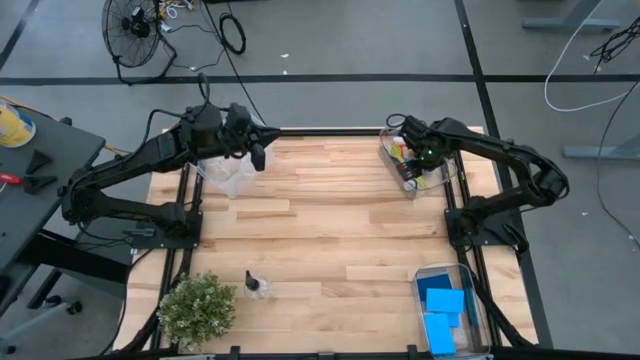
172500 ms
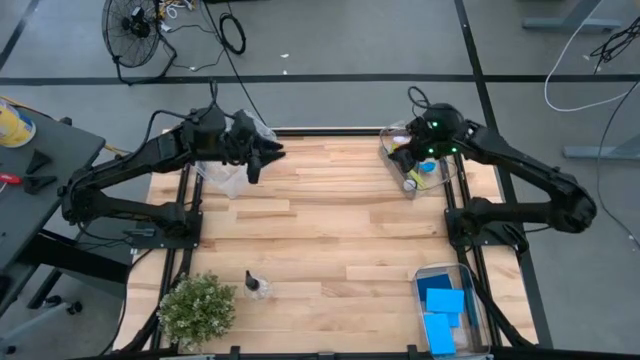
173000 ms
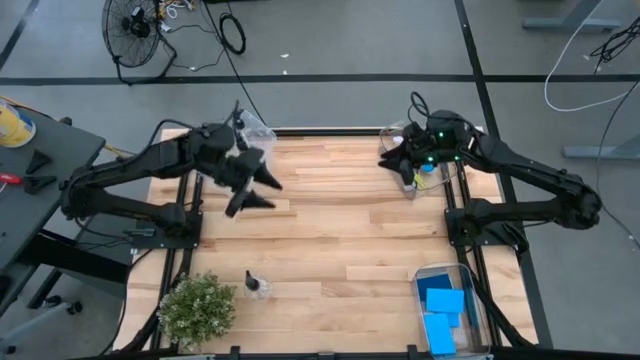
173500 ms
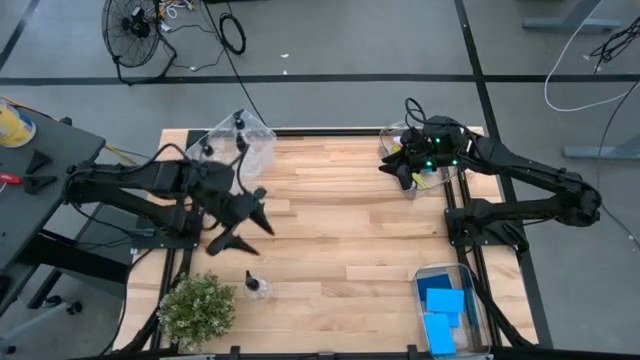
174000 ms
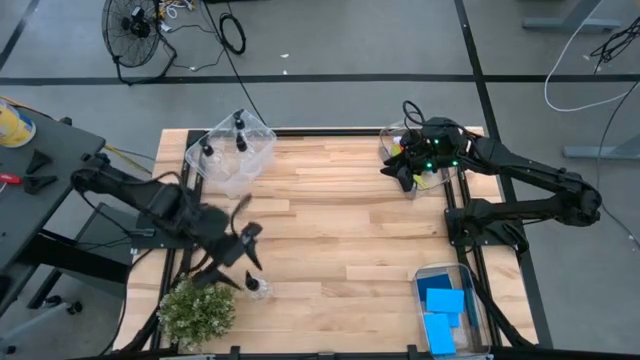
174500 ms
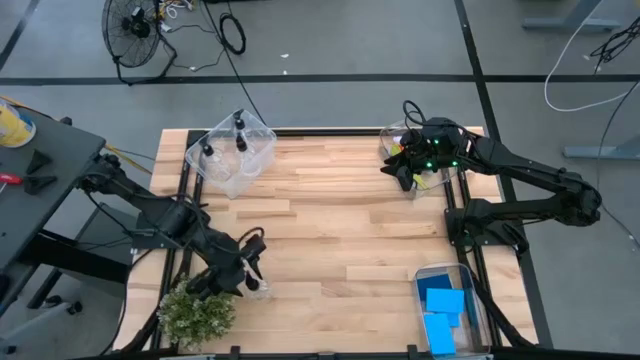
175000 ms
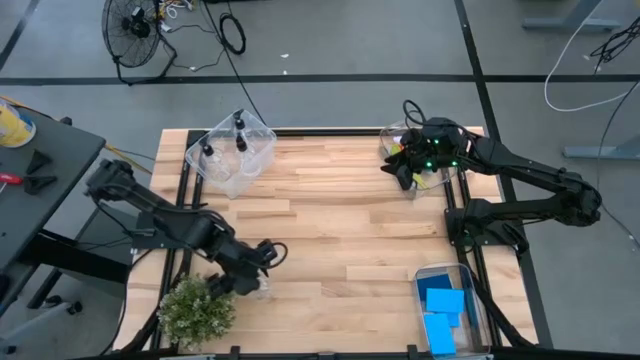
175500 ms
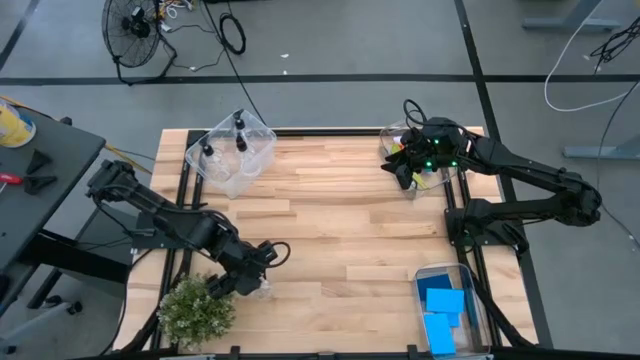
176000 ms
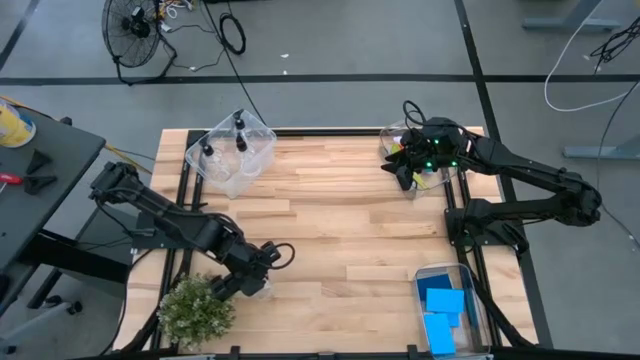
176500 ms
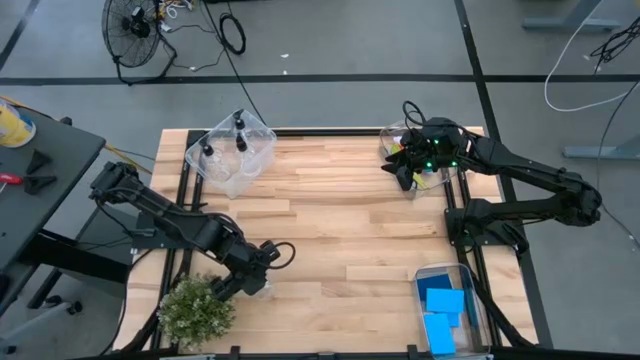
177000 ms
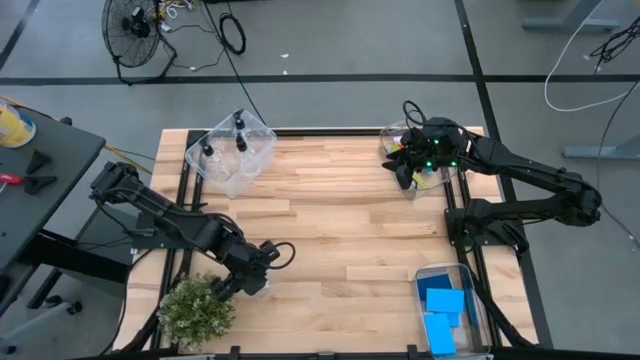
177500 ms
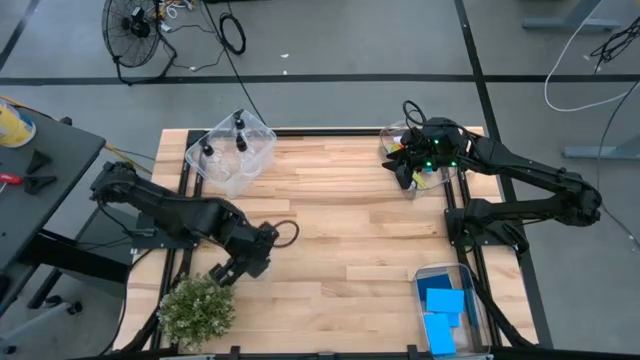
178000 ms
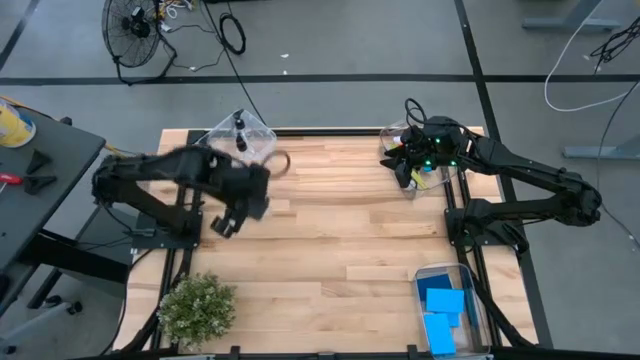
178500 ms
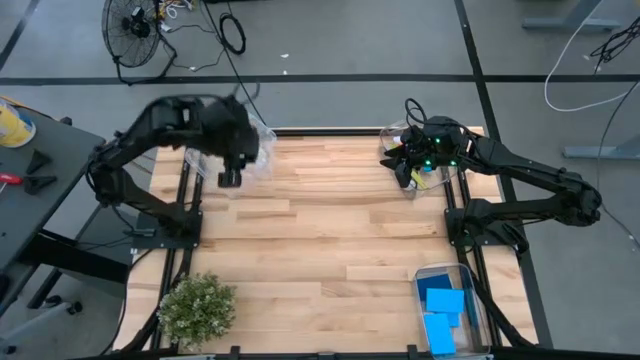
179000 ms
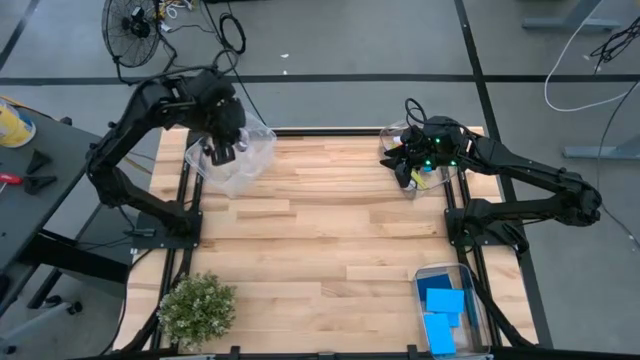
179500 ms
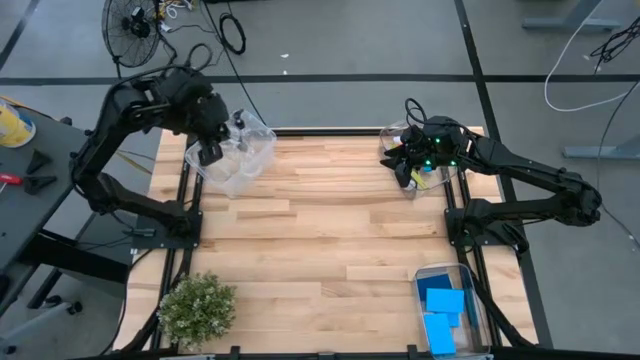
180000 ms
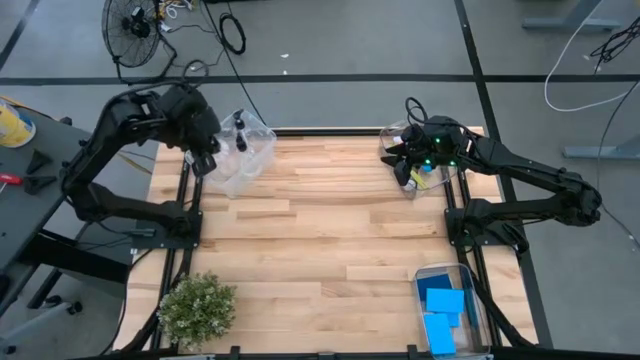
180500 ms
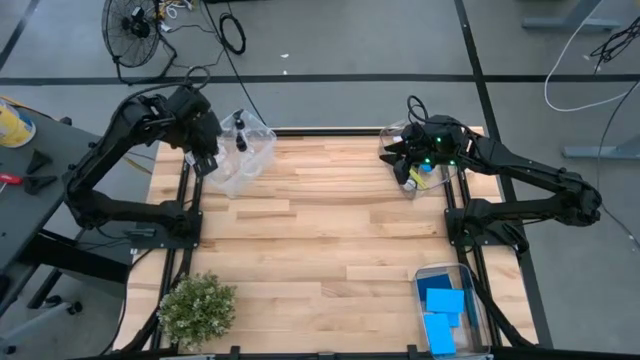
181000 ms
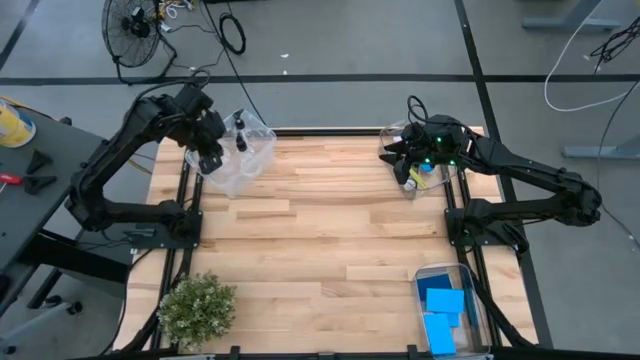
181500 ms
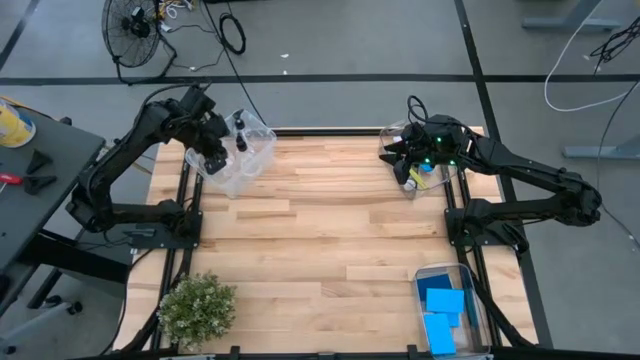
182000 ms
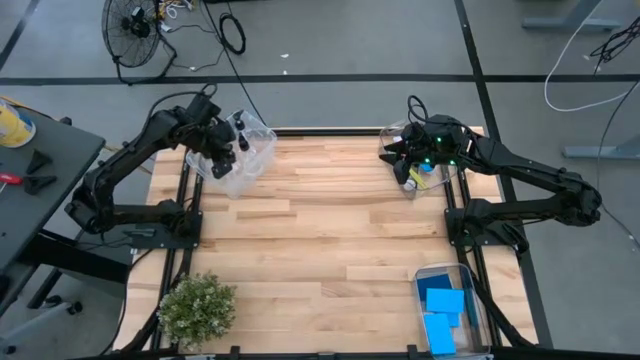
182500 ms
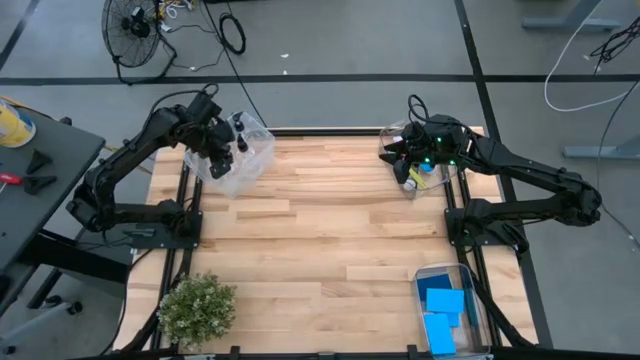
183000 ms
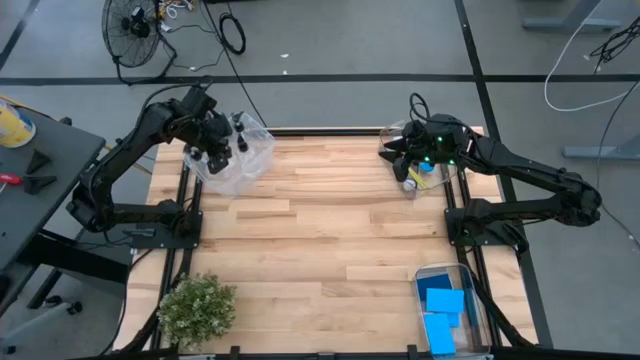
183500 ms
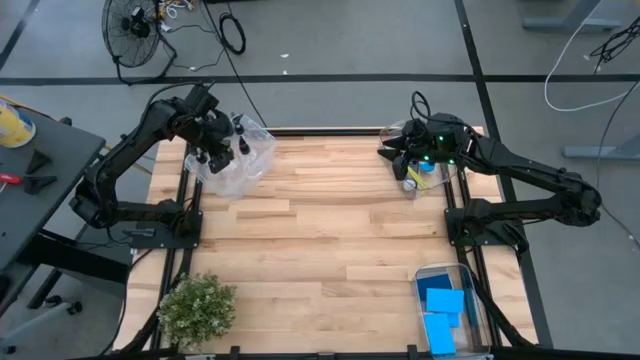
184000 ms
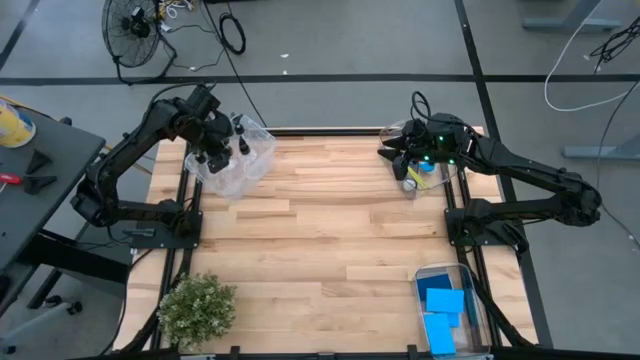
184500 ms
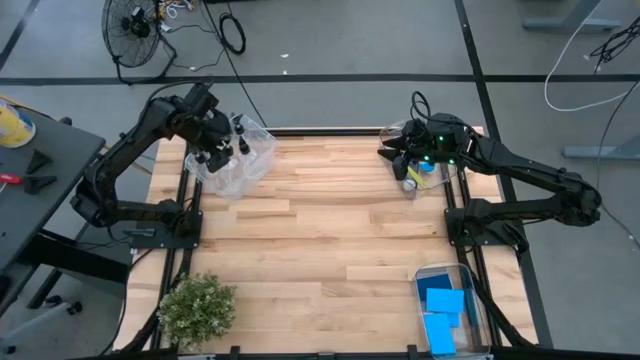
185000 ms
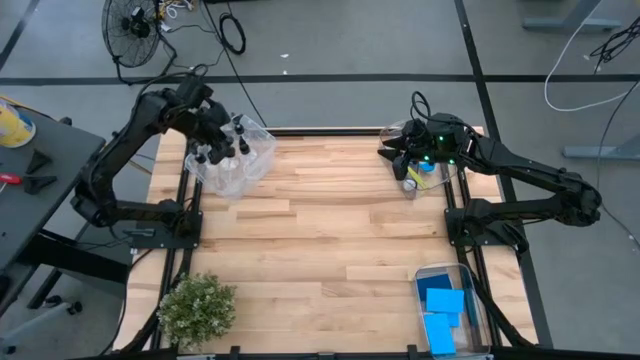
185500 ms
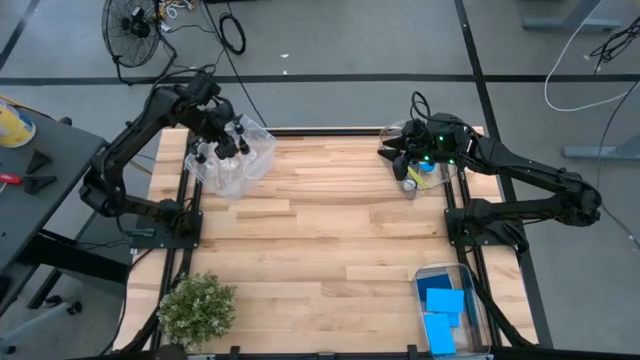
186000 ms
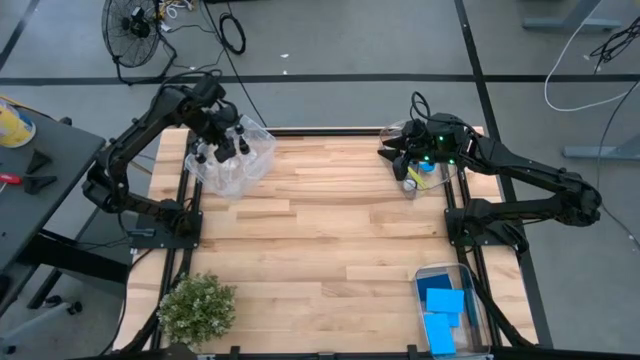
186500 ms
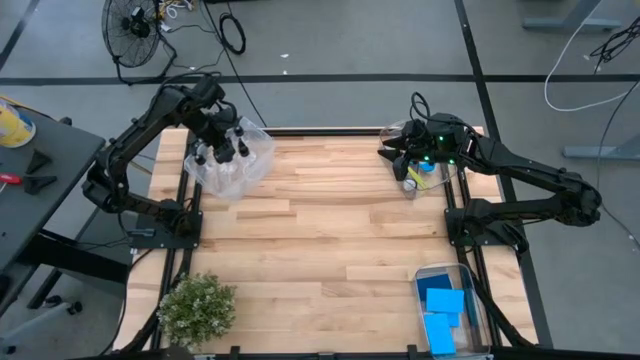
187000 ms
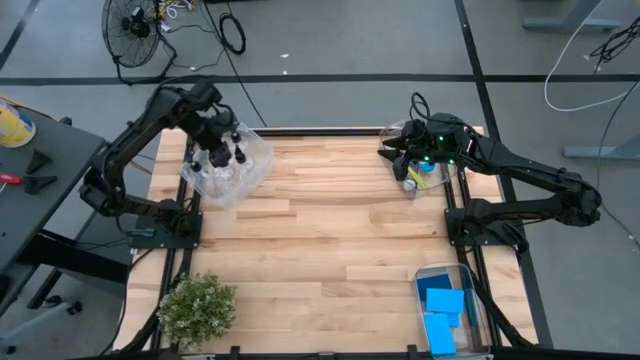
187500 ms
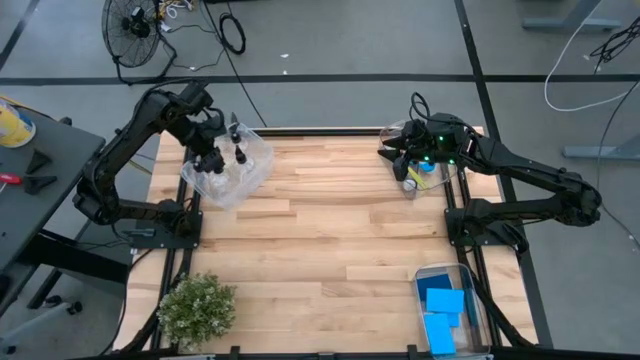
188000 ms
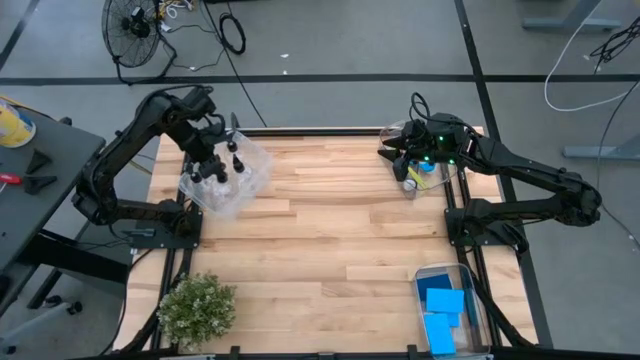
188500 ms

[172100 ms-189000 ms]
Task: Pick & Place Kitchen Sink Supplies
Put the transparent bottle spray into the transparent container

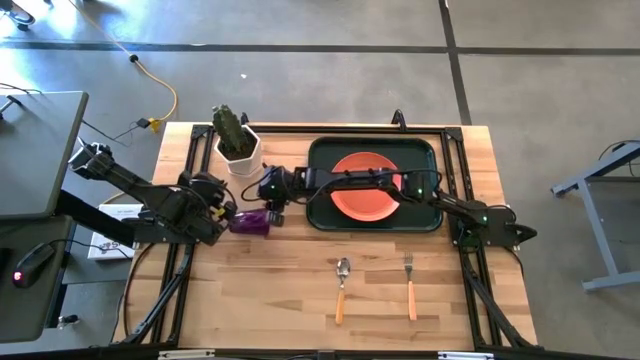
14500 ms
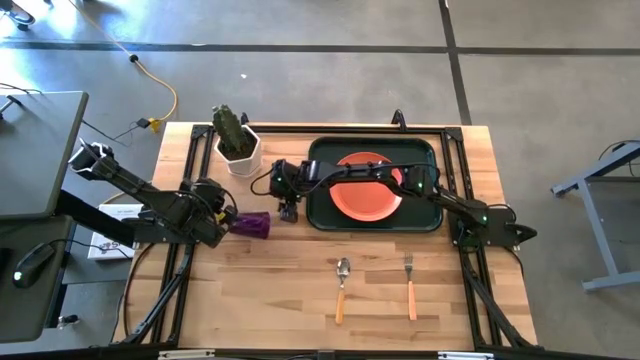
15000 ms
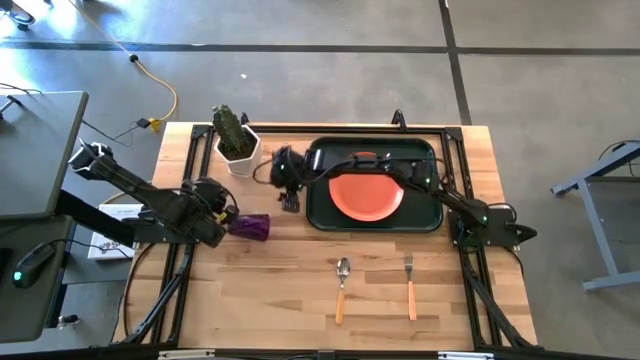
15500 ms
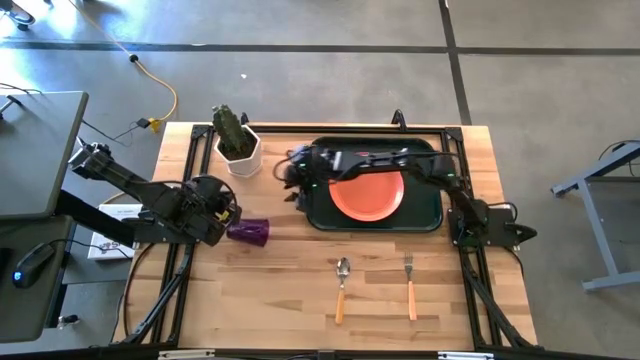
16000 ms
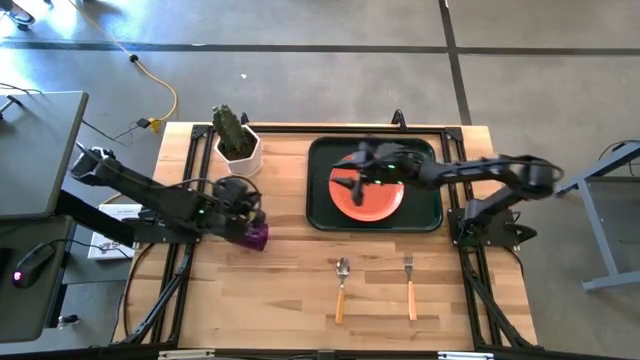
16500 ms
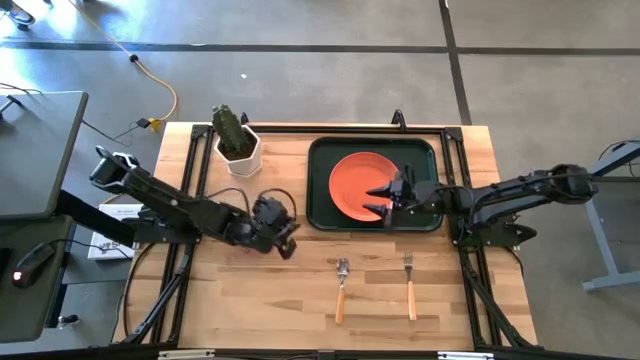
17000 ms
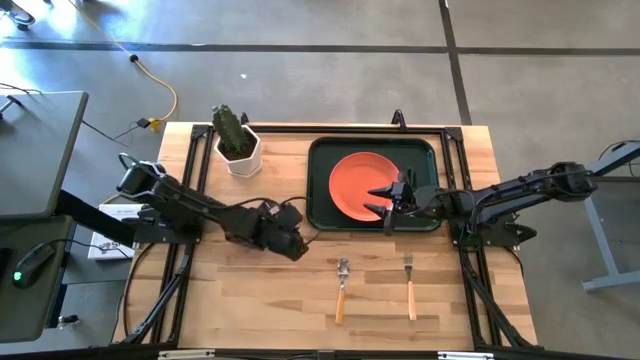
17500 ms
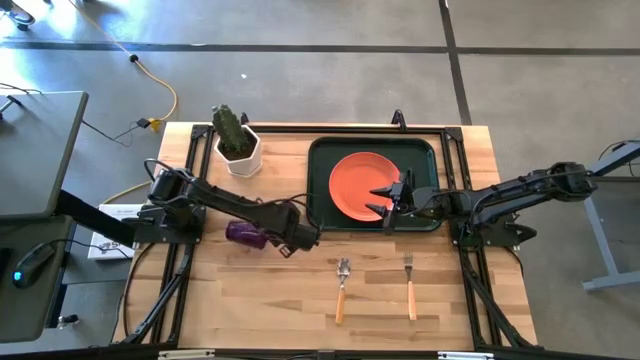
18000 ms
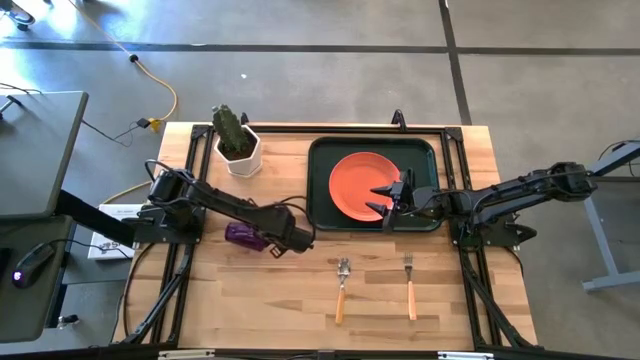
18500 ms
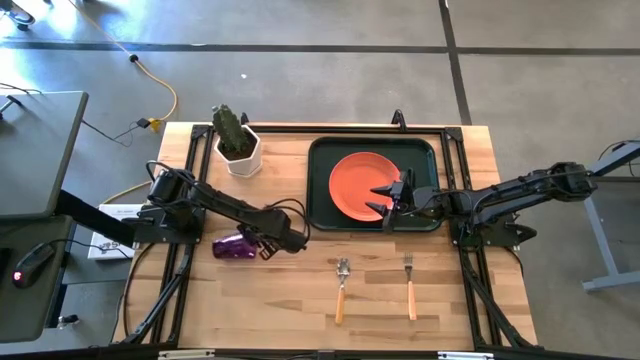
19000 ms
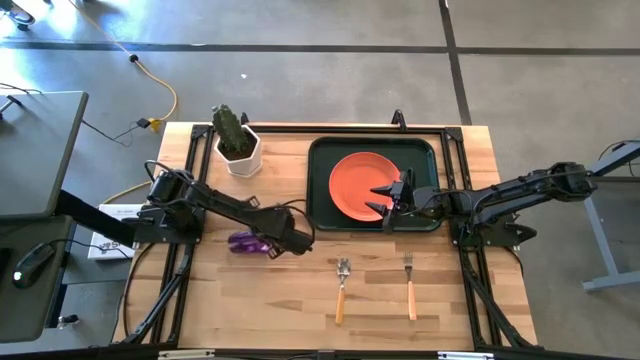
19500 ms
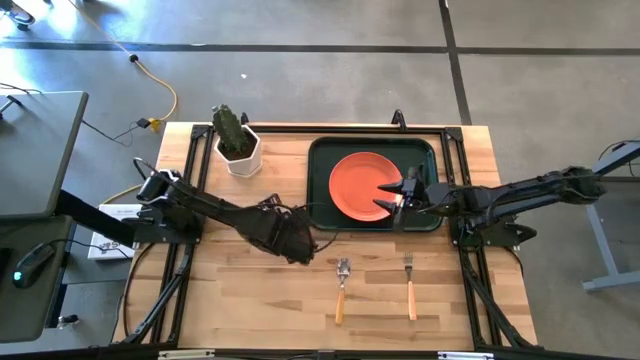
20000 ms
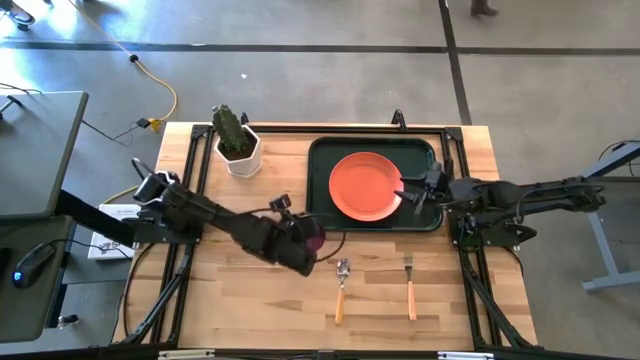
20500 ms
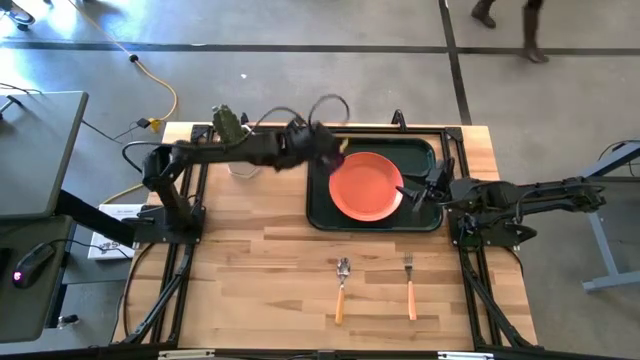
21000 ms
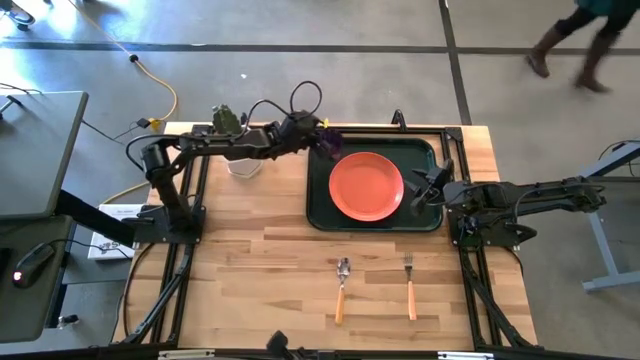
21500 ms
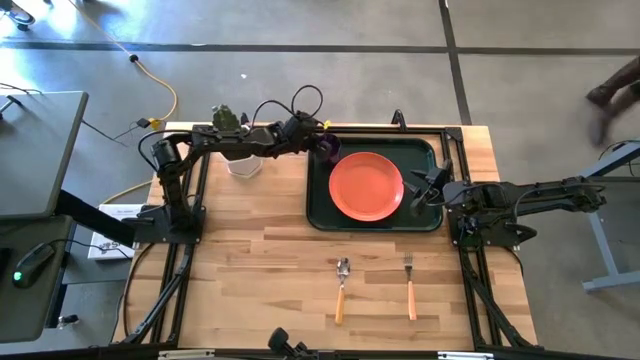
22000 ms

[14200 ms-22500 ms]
Task: Pick and place plate/cup/fork/spoon on tray
Put the violet cup on the black tray to the top left of the orange plate
